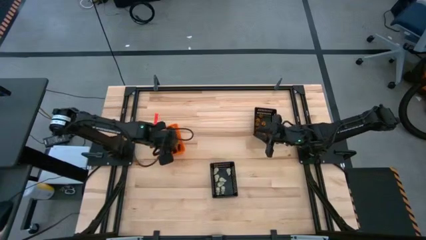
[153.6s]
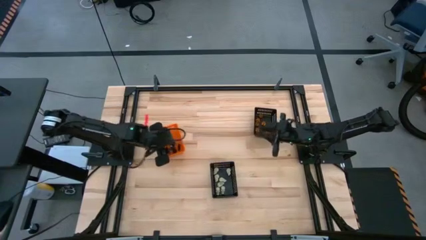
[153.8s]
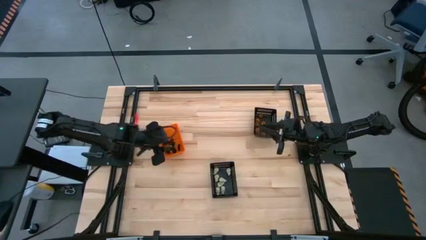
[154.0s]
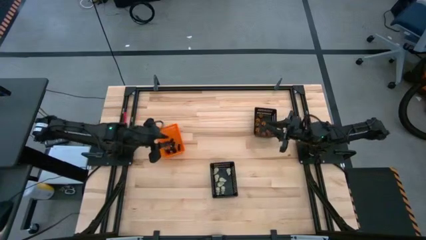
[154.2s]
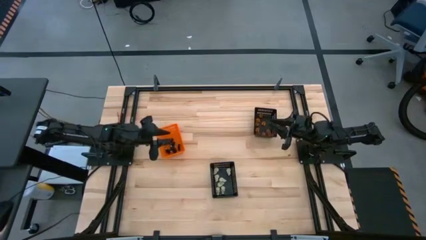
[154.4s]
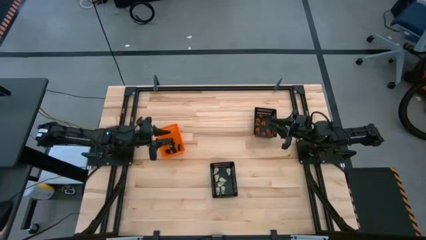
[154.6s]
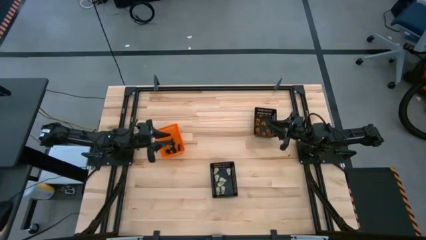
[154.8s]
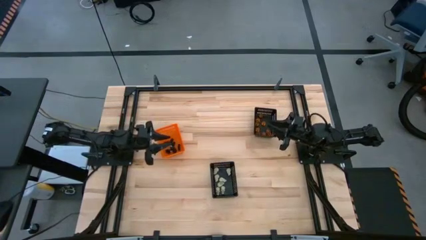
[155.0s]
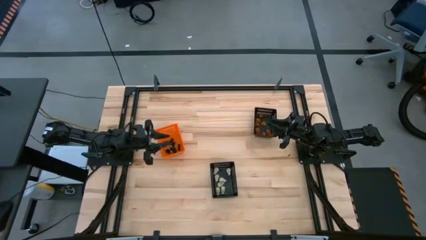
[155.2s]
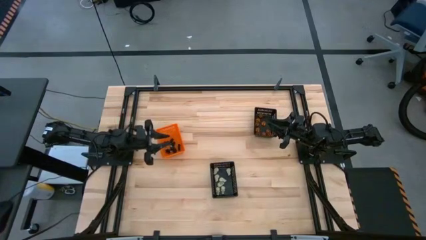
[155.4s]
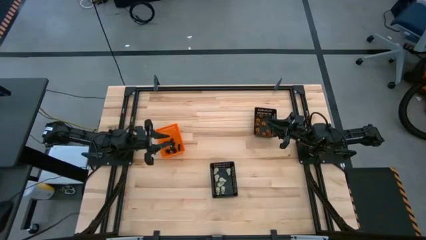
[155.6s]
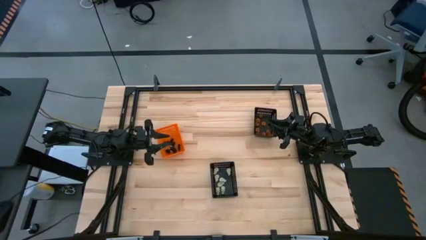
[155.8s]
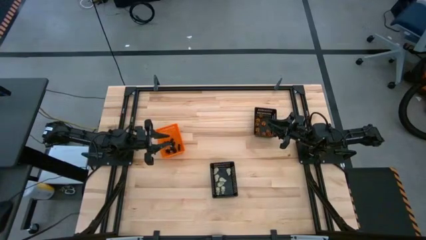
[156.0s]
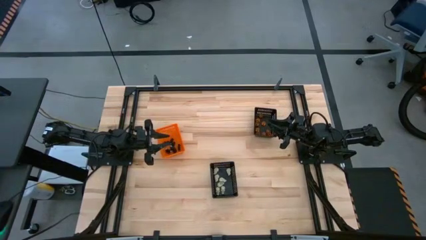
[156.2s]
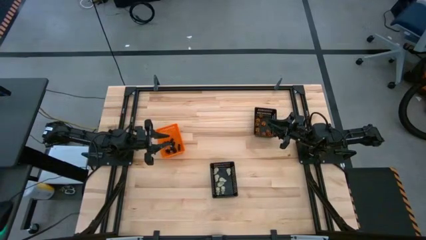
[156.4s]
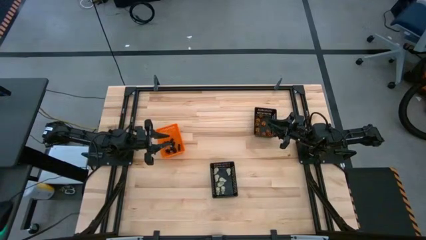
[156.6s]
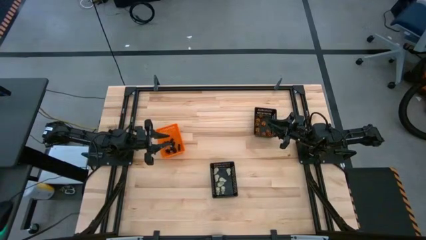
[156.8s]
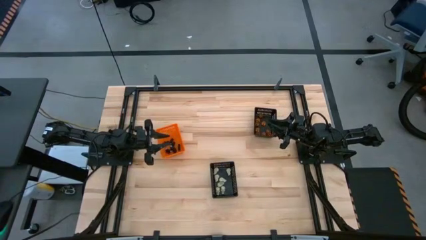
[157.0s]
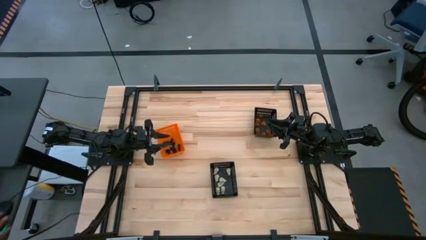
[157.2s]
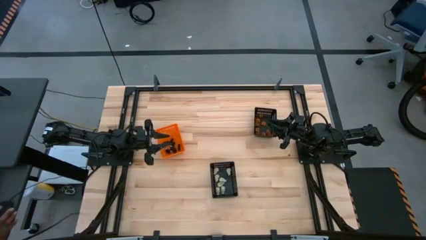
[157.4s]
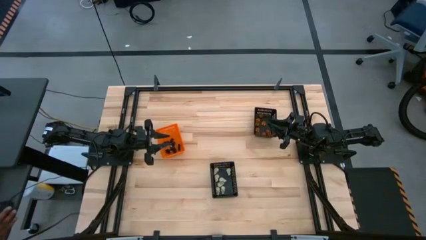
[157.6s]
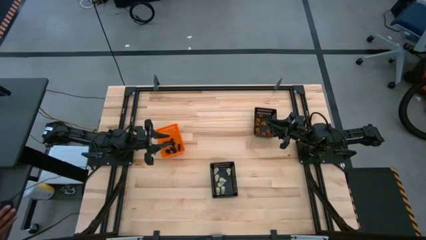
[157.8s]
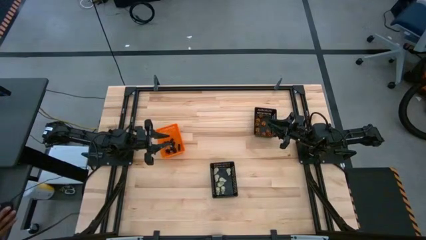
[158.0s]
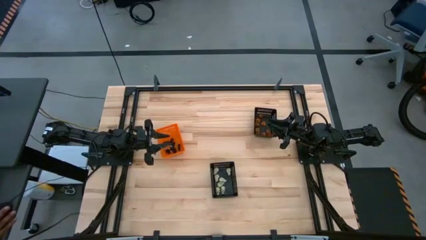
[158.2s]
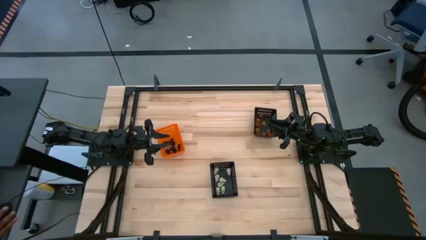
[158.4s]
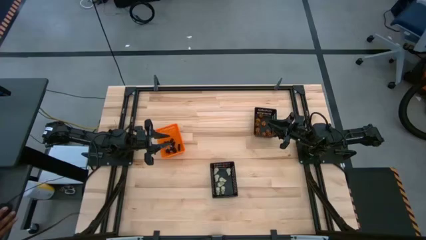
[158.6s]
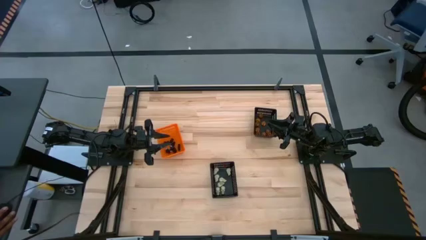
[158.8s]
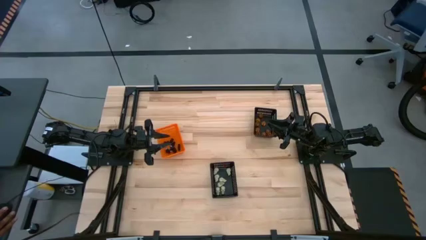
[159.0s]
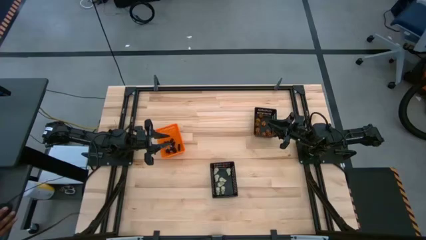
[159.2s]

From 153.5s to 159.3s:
Task: Sort Halloween decoration
Return to Home Position

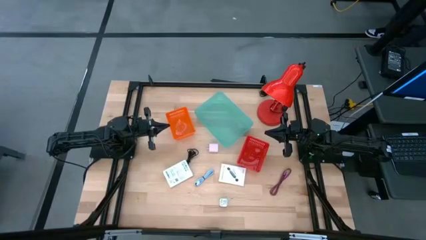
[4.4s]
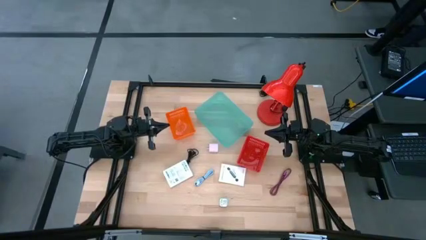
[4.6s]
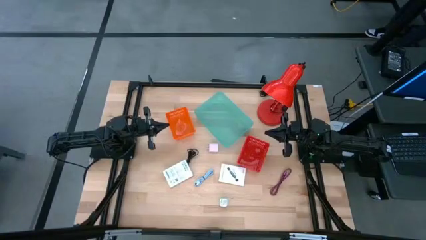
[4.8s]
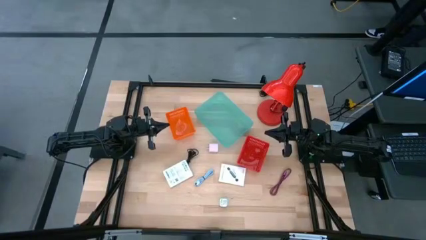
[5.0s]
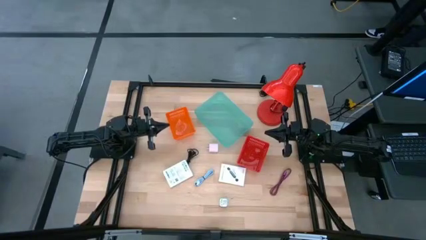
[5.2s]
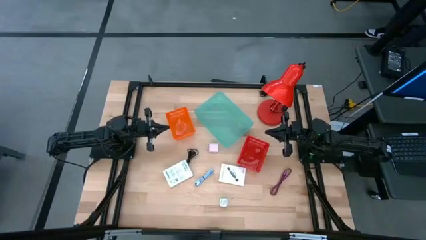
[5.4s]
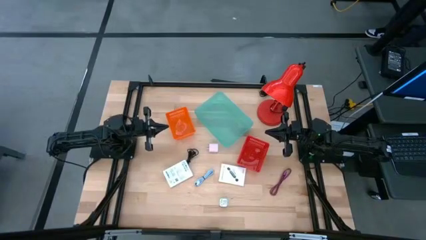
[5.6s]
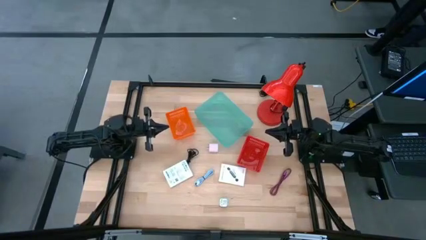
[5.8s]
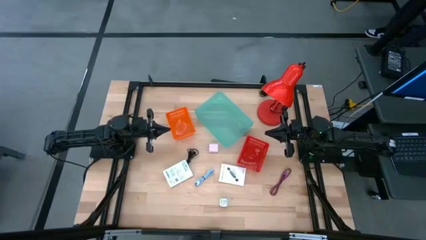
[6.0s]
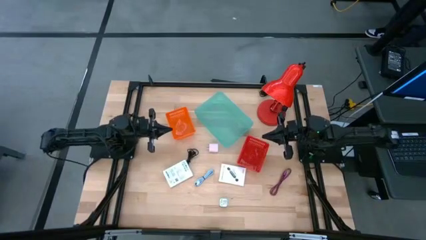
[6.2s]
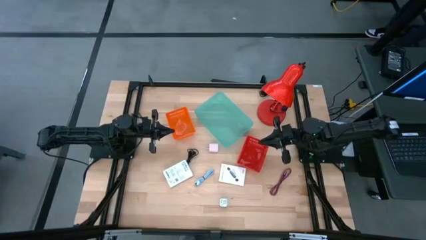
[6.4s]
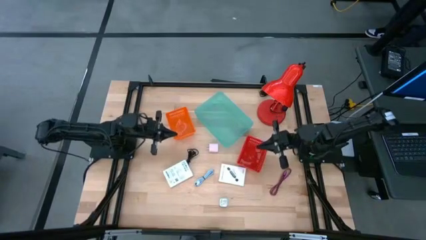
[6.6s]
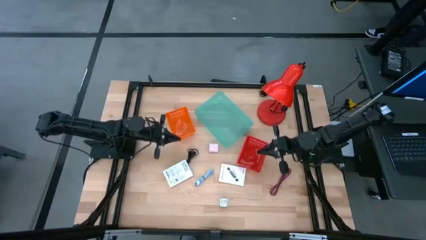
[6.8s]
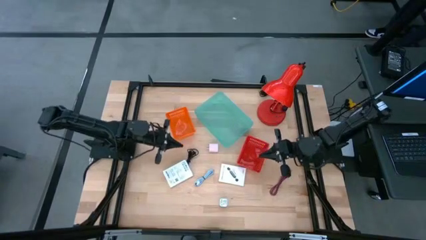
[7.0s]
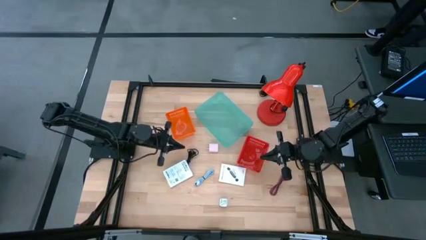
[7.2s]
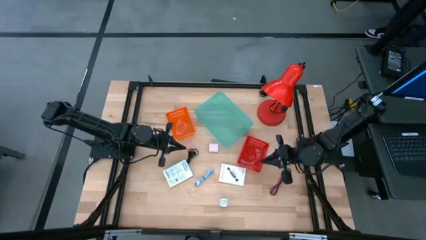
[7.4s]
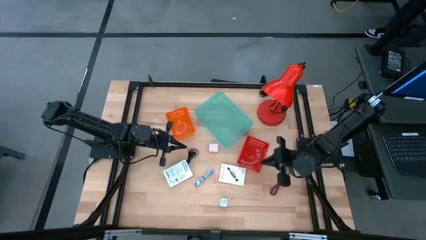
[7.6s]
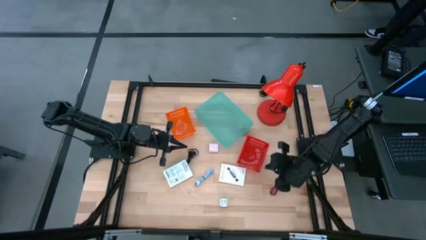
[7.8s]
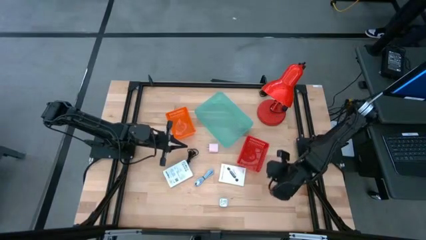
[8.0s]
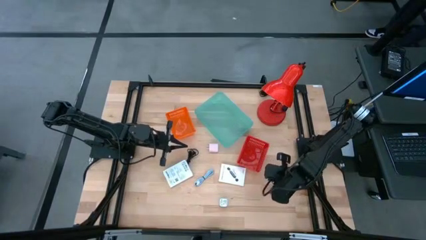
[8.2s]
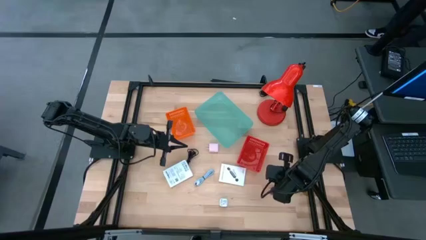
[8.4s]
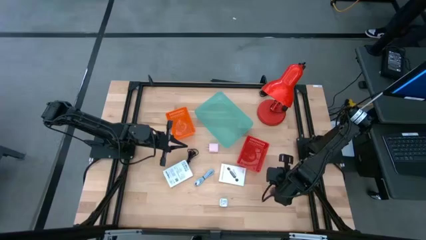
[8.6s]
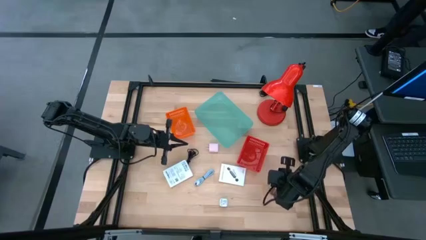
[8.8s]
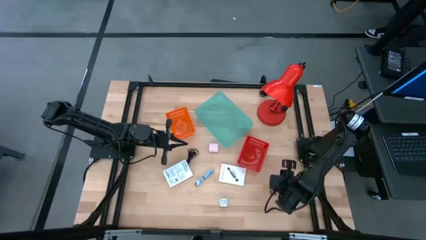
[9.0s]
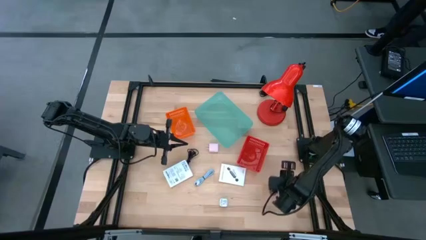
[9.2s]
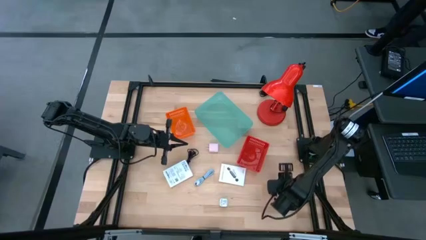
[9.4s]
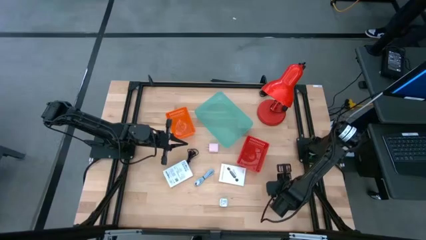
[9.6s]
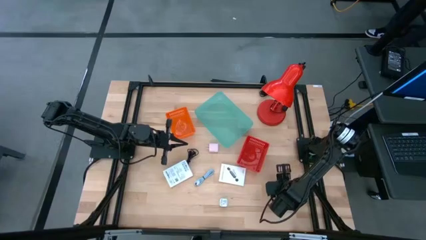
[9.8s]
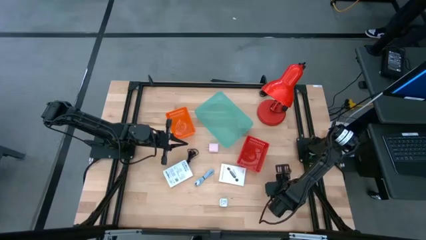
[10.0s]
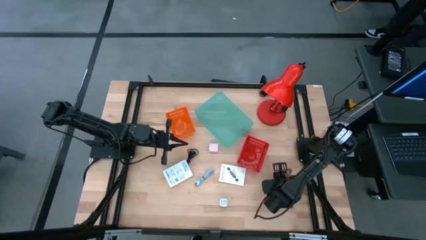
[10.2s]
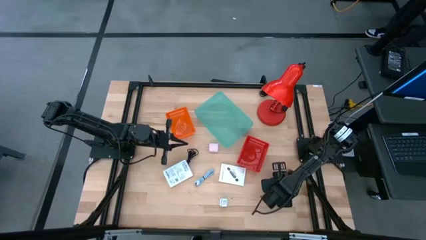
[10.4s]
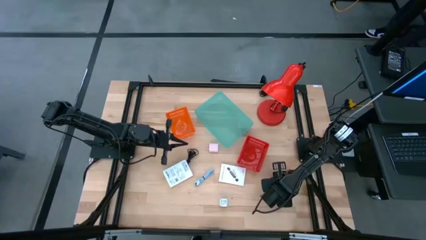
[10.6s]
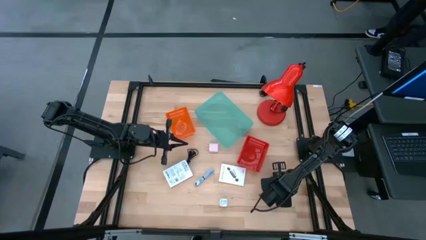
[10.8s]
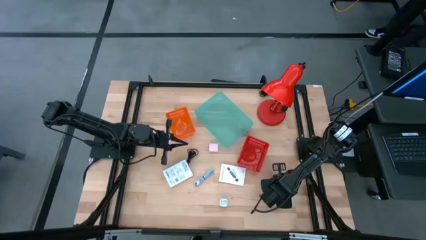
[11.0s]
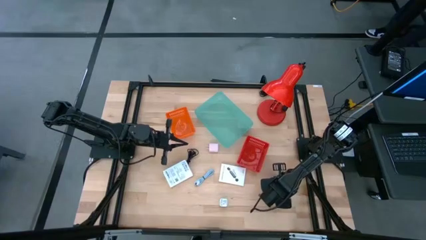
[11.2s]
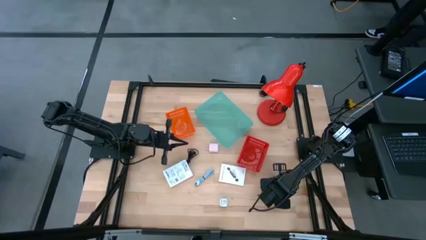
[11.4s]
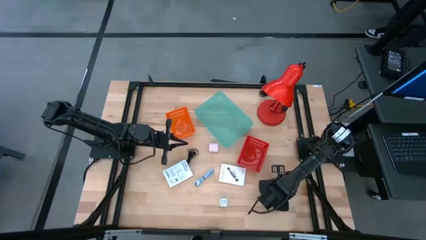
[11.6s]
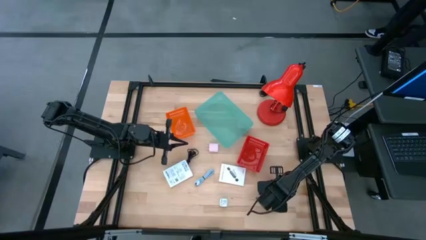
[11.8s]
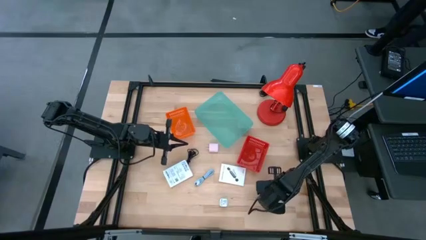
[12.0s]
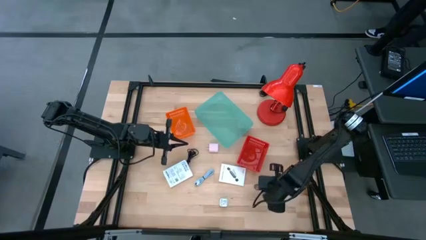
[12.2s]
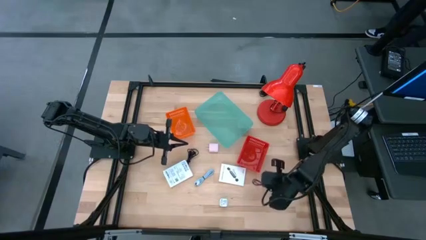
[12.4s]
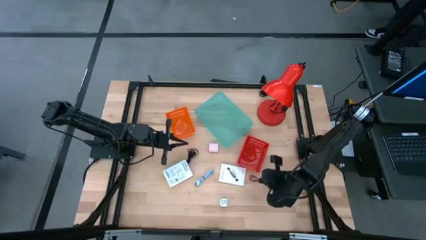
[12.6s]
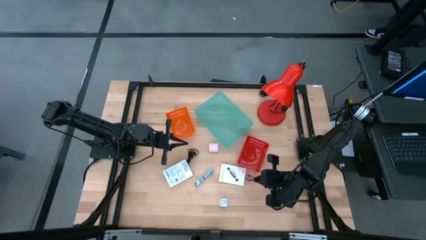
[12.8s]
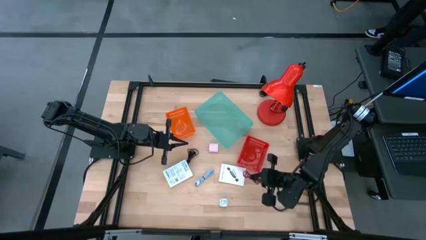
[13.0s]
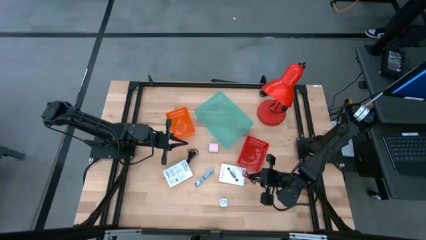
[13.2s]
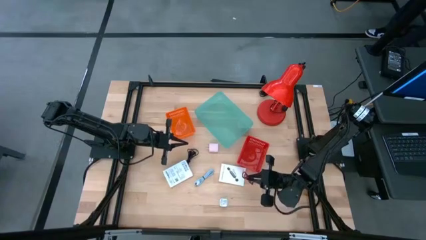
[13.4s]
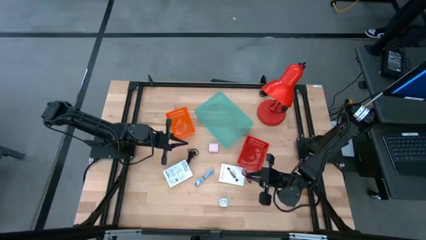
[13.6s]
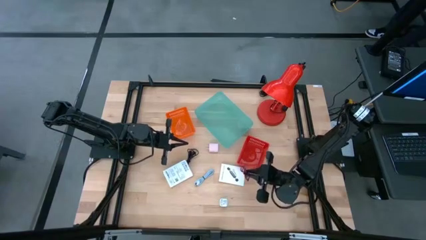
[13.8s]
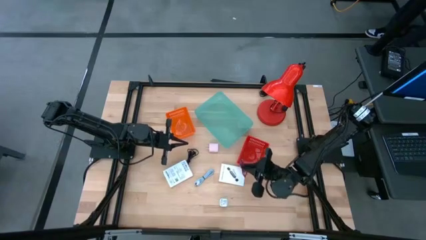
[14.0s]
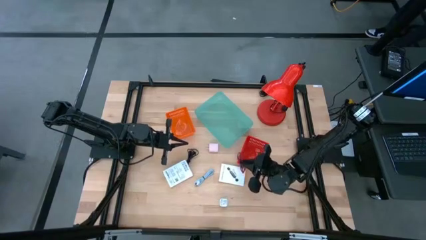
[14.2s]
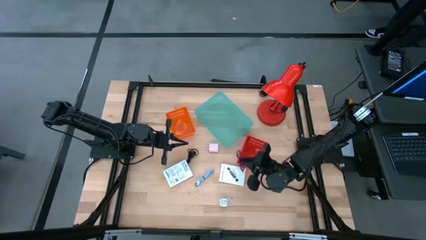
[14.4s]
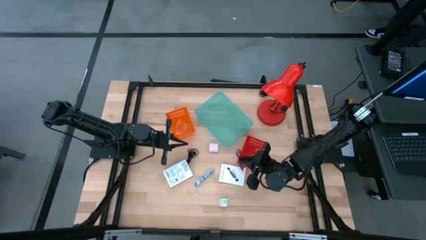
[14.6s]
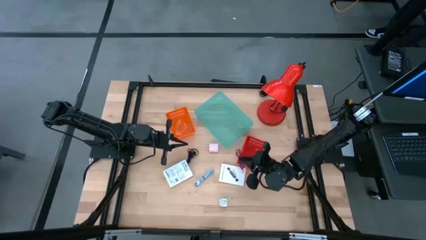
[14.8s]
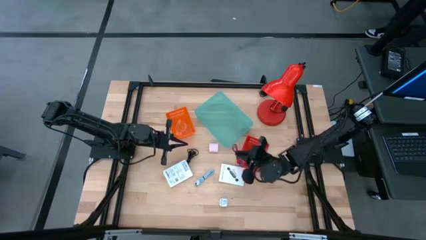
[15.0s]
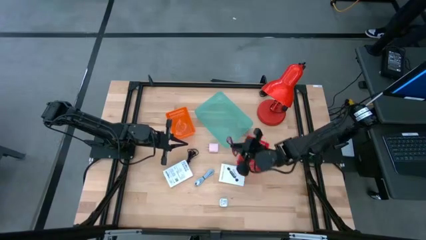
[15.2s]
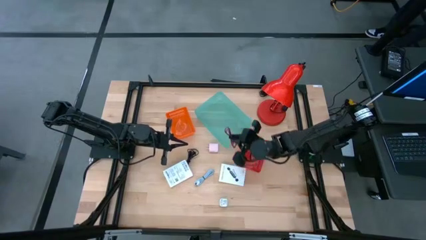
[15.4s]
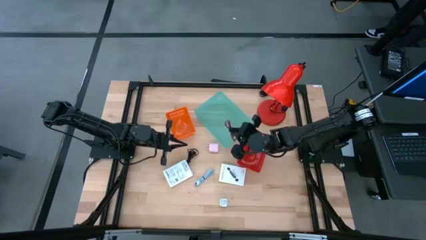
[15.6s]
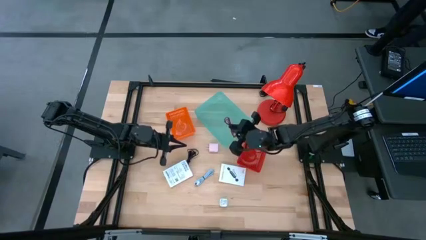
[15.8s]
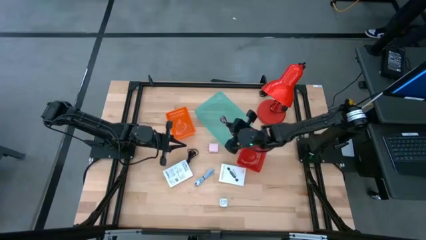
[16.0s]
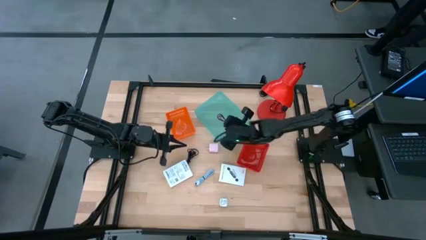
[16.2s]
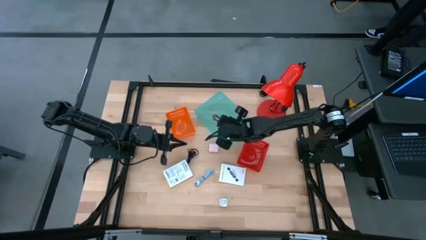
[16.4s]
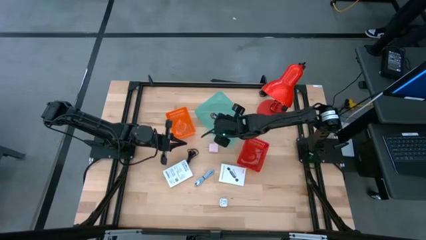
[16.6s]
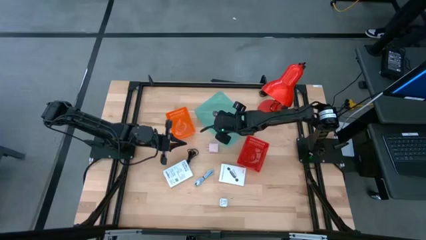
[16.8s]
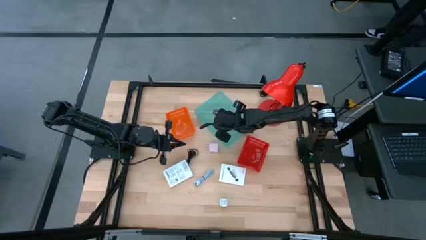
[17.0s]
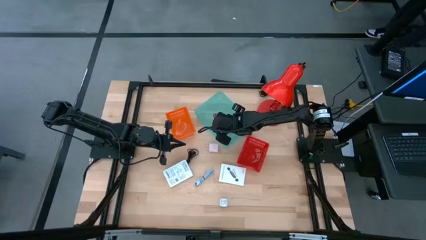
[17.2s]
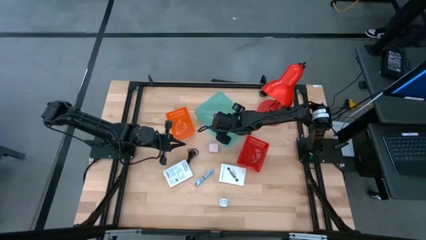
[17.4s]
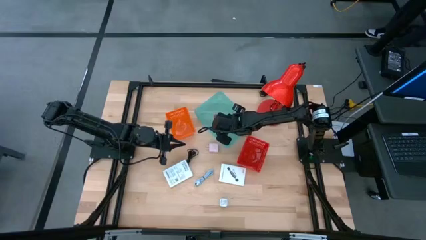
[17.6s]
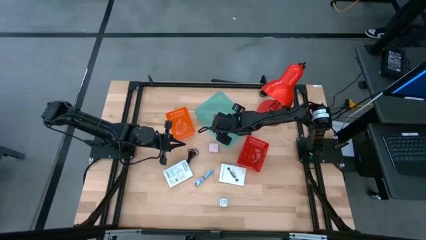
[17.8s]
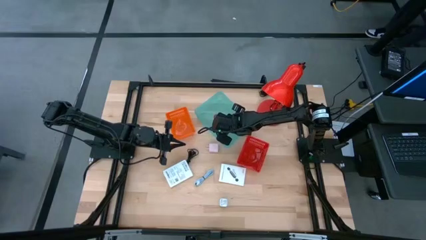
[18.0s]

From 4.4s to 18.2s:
Task: Pick and place items into bin
Put the pink charger cable into the blue bin
